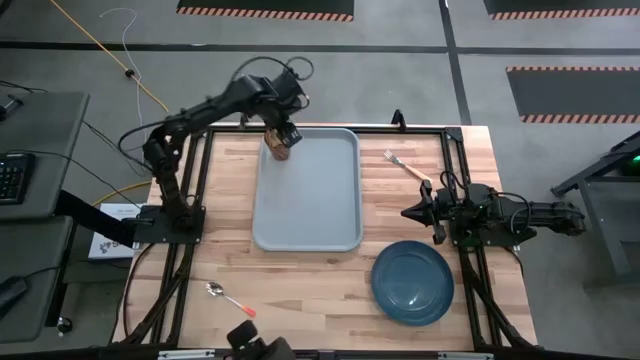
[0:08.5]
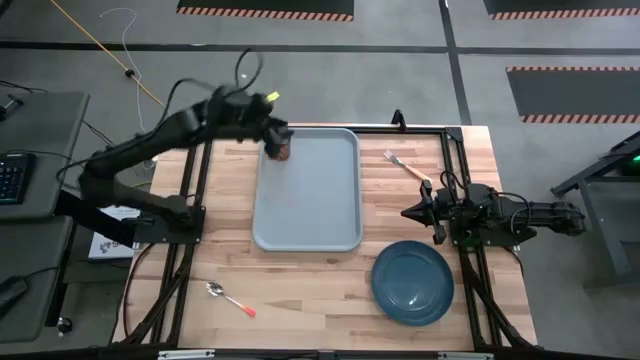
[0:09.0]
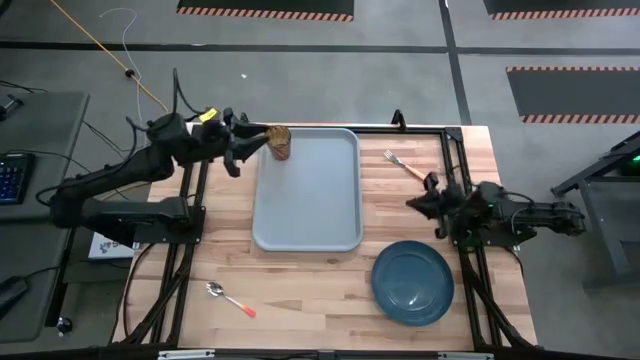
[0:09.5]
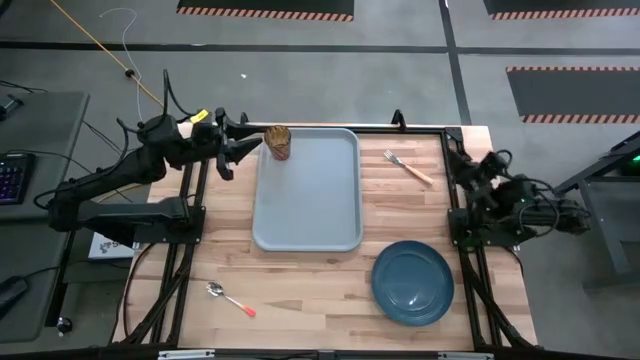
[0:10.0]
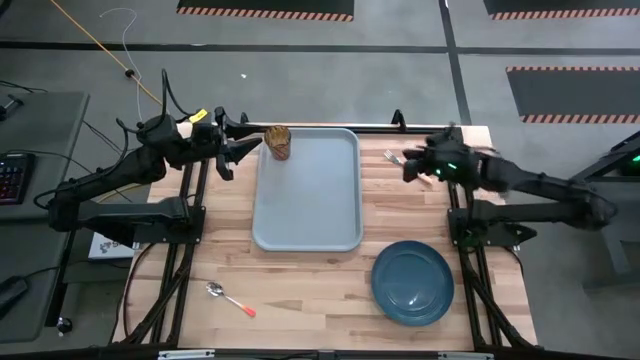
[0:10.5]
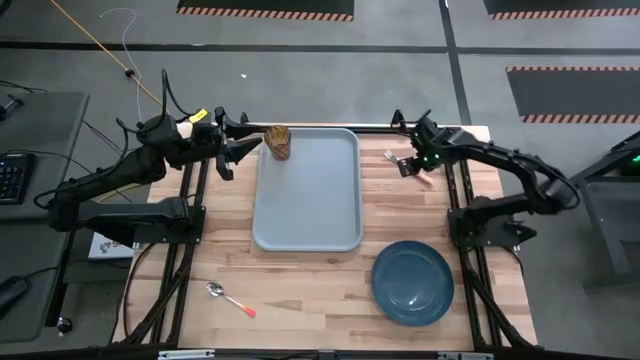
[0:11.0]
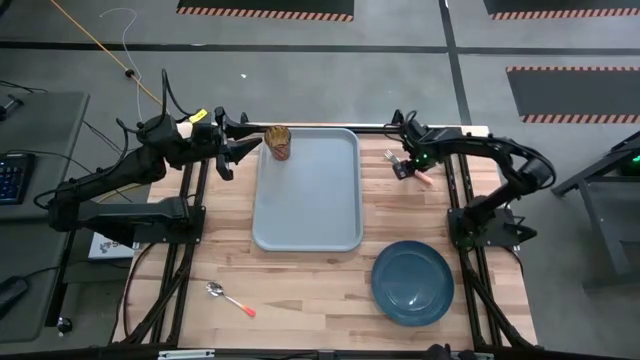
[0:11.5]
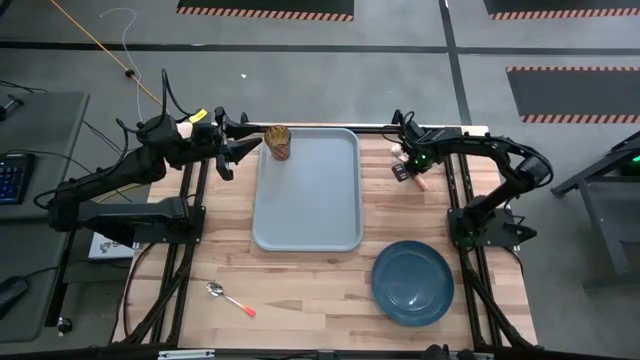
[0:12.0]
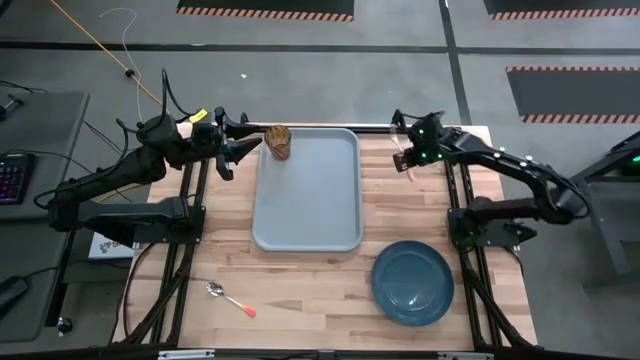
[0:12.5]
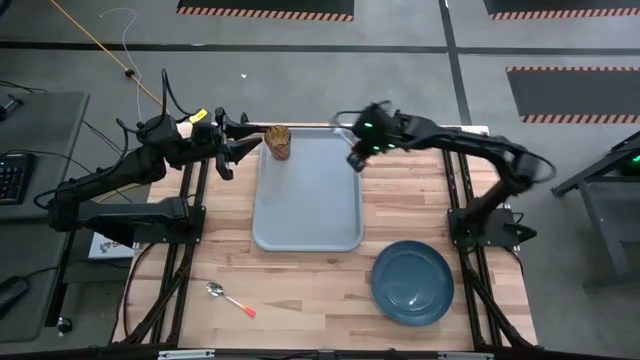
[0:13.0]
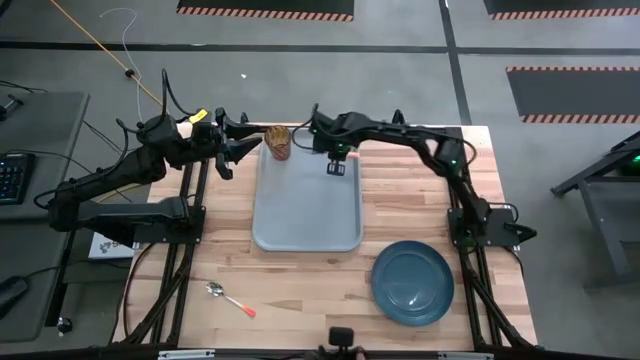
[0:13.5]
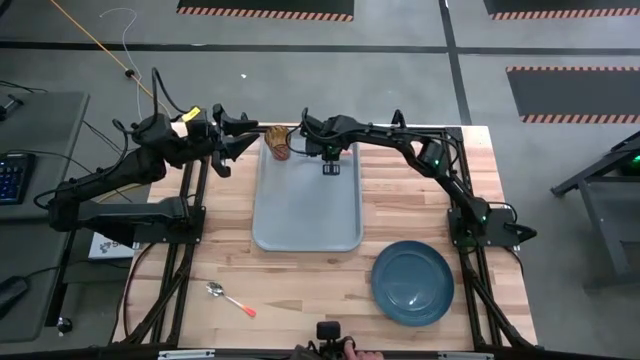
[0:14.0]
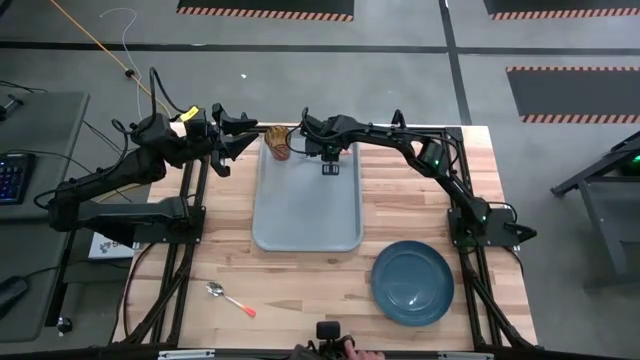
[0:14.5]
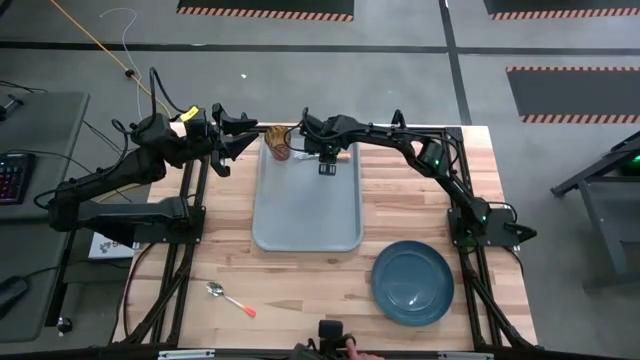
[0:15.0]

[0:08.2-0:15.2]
Task: Pick and place plate/cup/fork/spoon on tray
Put the yellow fork beside the brown glass on the gray tray

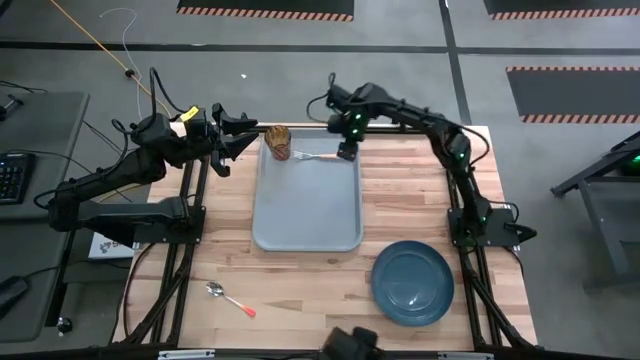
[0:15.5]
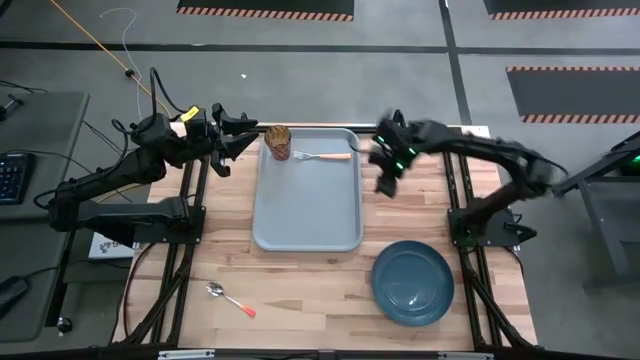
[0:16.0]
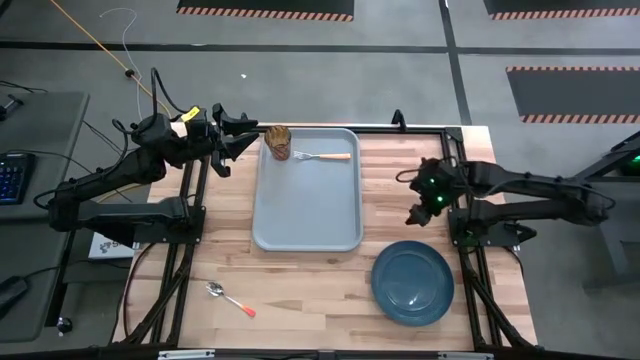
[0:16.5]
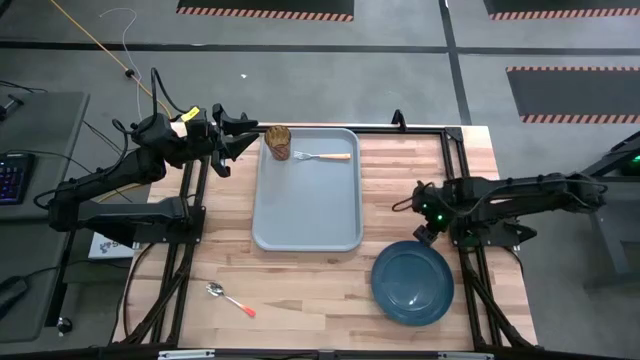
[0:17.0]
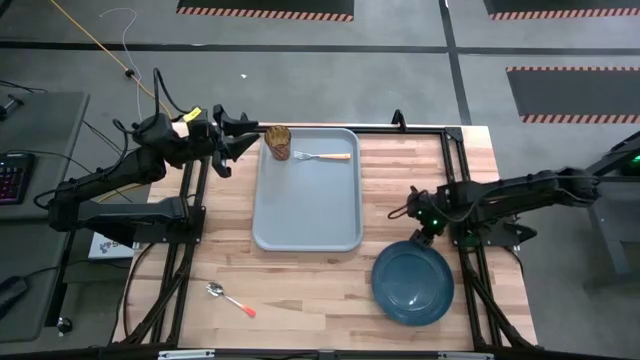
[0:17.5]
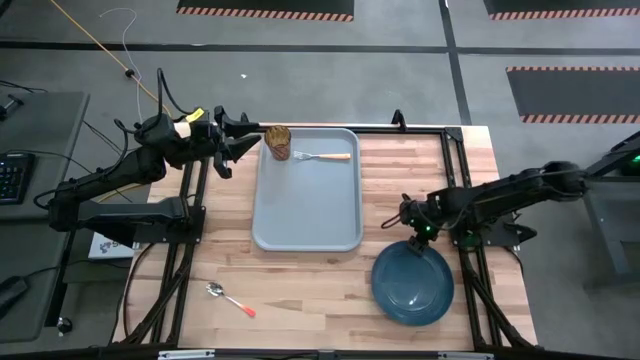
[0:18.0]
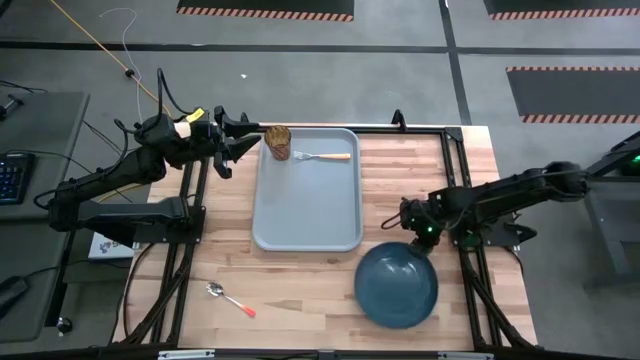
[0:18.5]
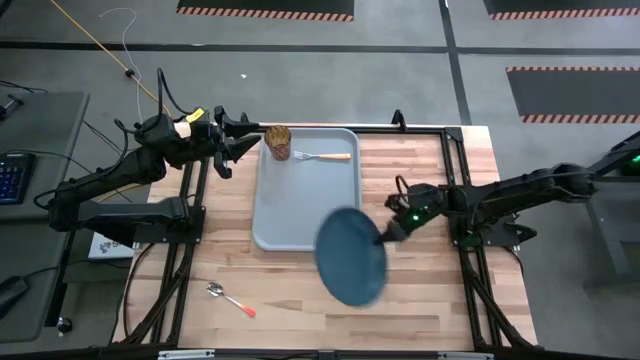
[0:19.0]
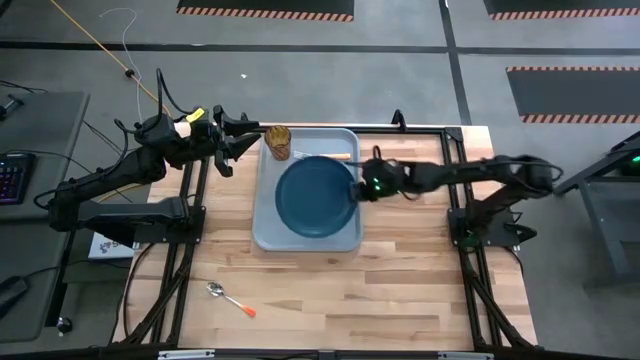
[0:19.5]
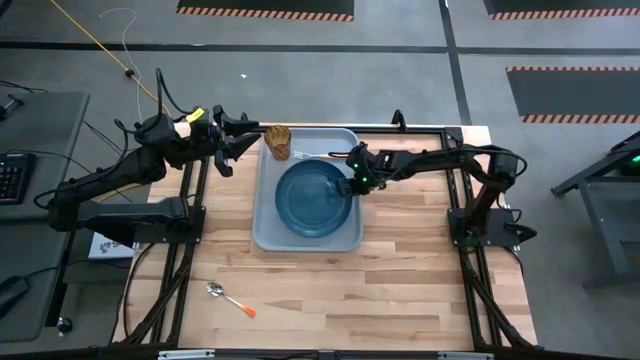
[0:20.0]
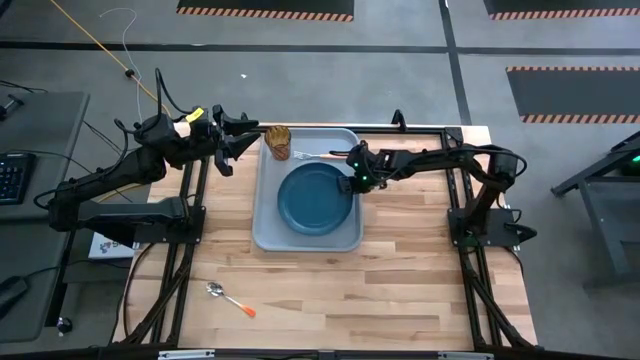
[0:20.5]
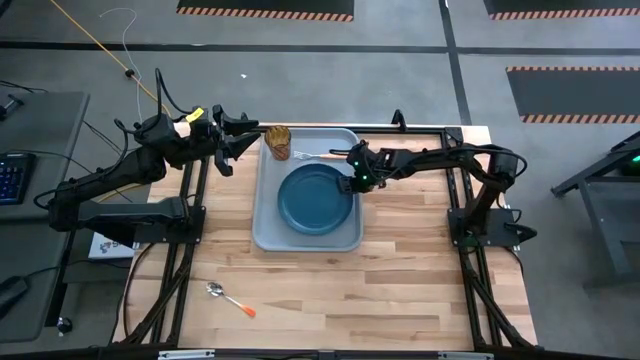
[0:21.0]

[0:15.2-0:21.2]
Put the blue plate below the yellow fork on the gray tray

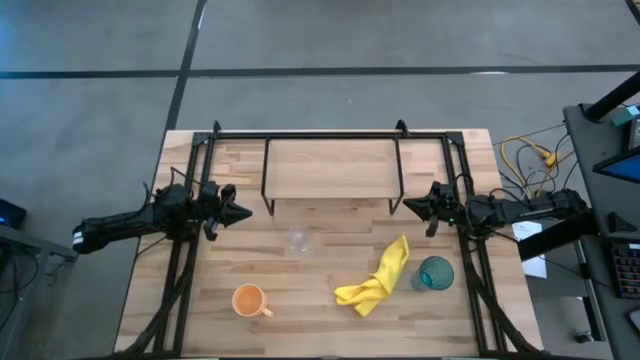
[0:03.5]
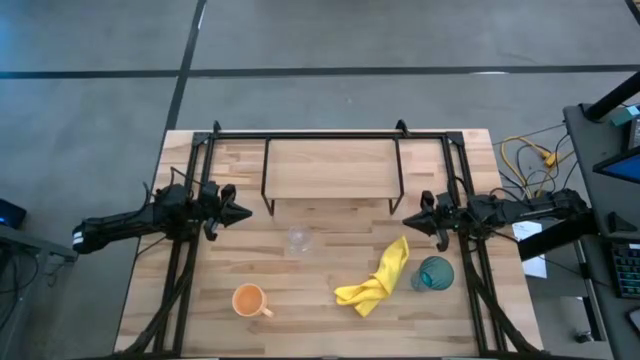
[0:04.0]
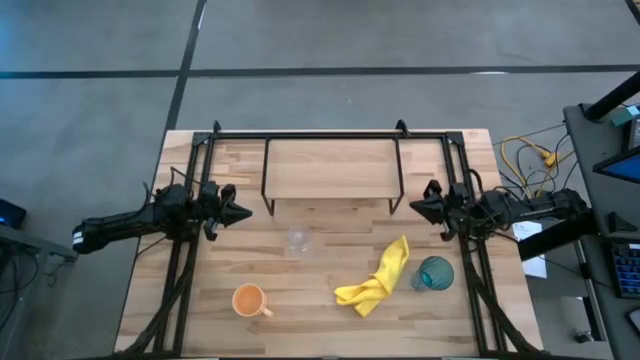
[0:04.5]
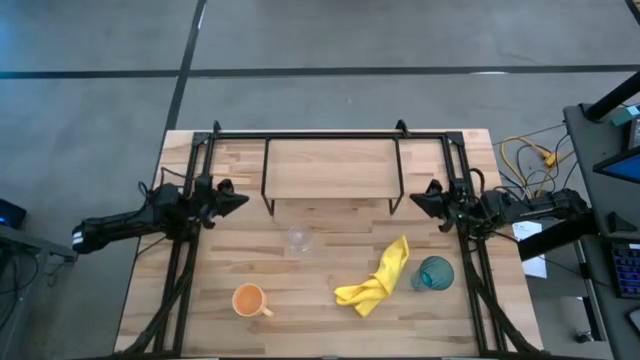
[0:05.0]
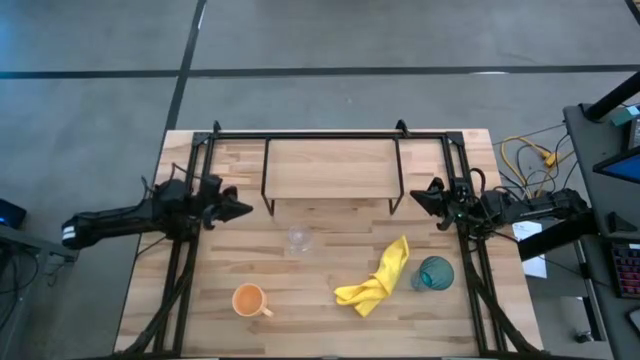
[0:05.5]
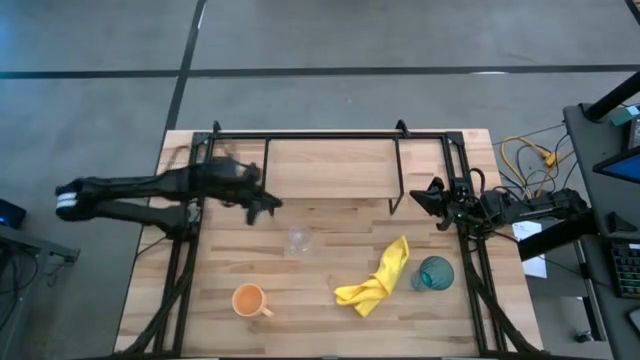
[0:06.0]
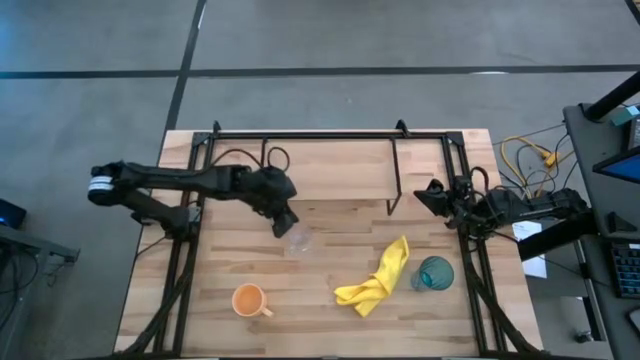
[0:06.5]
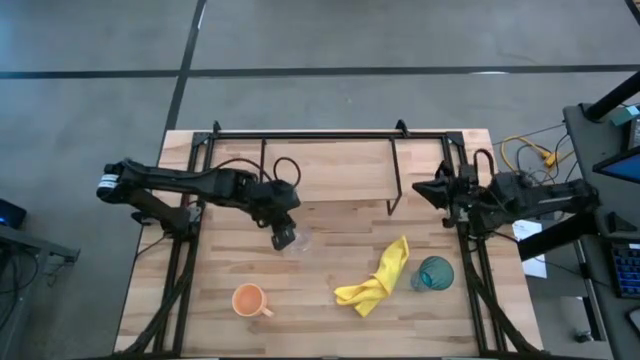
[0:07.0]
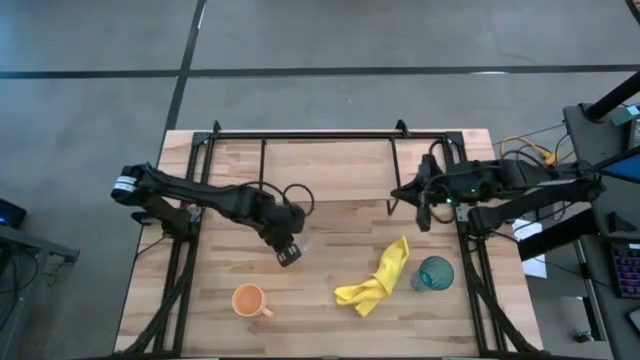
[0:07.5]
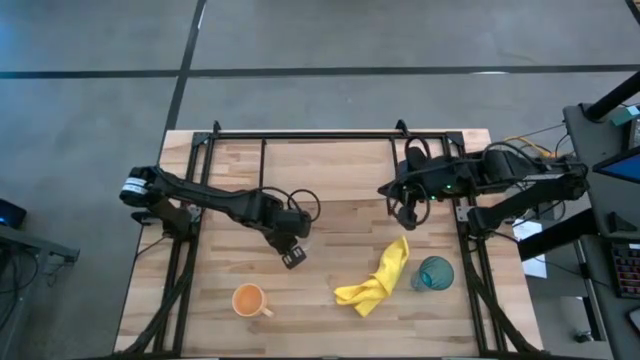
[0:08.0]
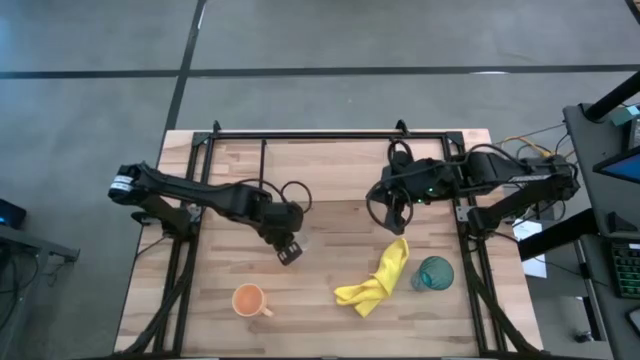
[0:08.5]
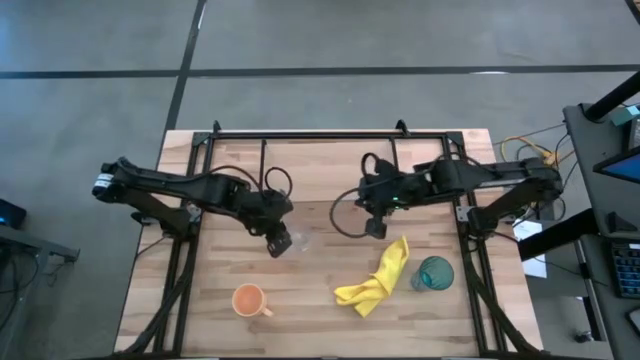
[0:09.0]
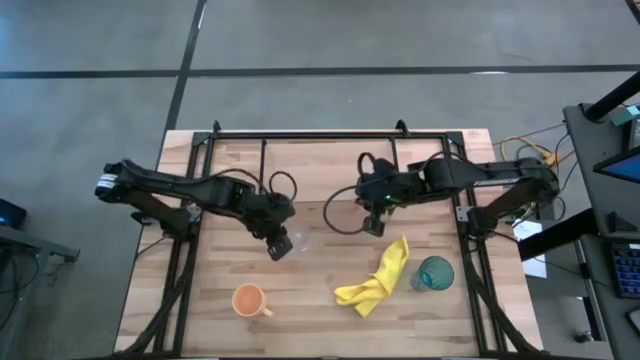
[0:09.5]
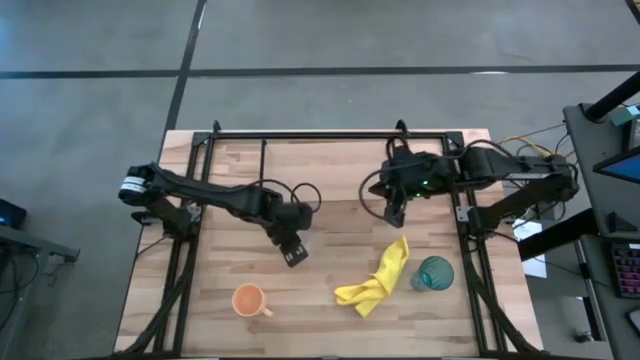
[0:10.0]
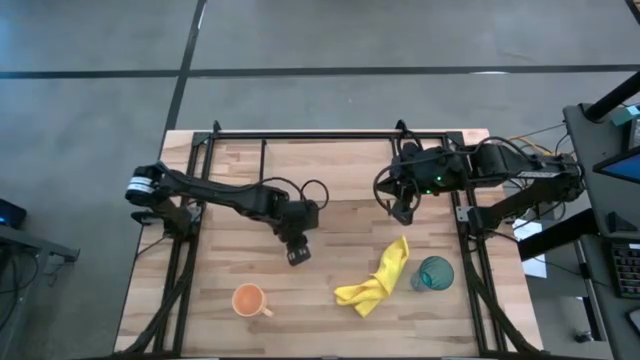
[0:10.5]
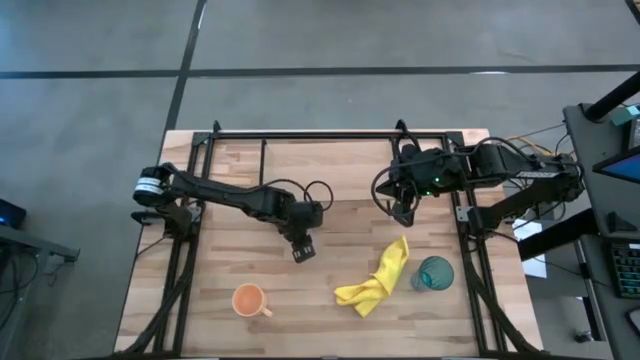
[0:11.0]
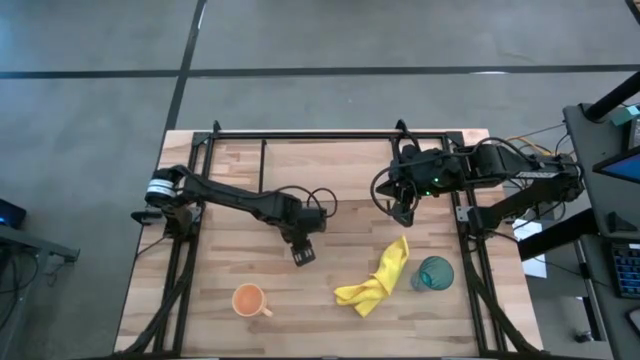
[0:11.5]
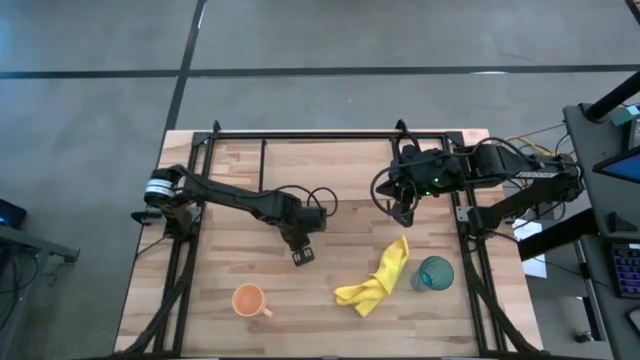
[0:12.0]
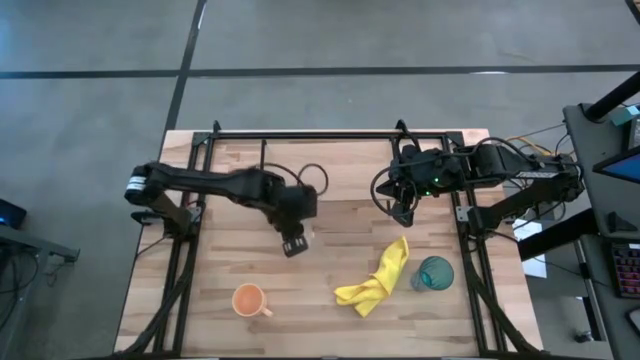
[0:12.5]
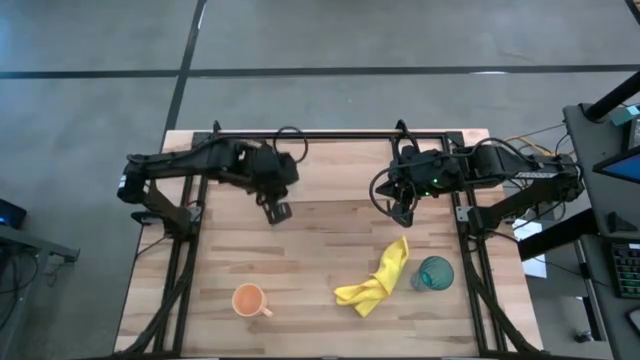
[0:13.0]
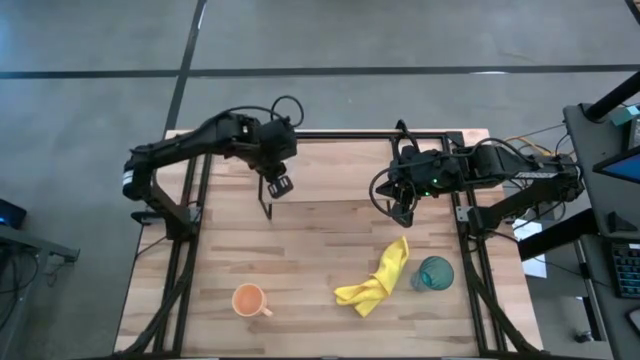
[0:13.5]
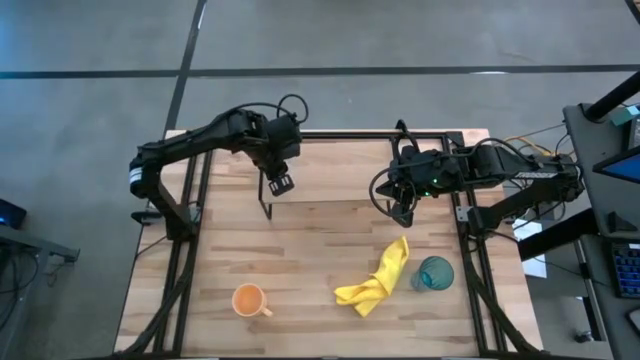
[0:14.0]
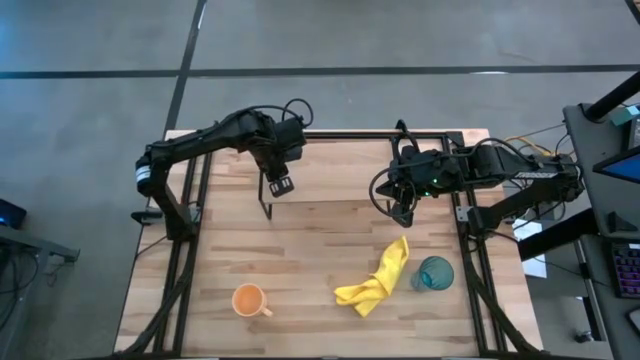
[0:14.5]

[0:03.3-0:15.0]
Task: Stack small to large cups/mugs on shelf
Put the transparent mug on the shelf
